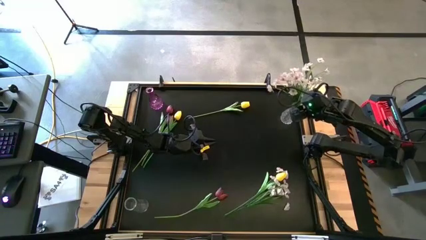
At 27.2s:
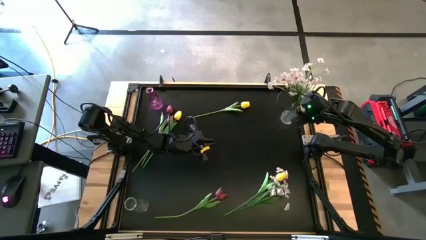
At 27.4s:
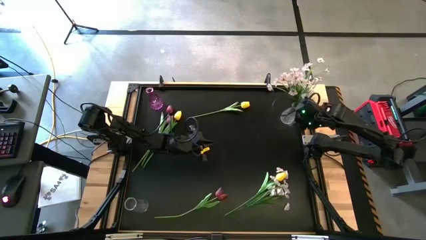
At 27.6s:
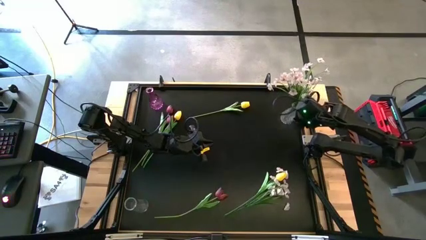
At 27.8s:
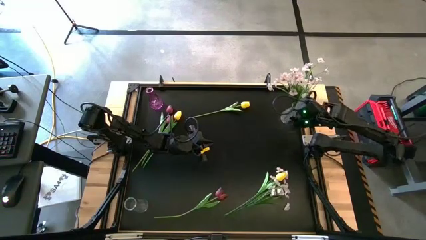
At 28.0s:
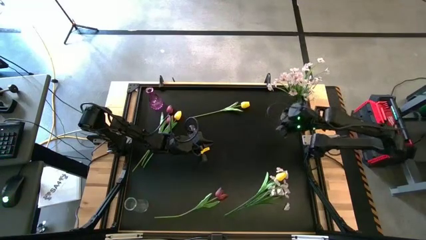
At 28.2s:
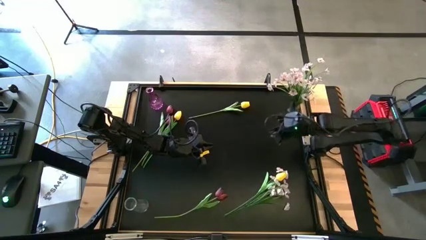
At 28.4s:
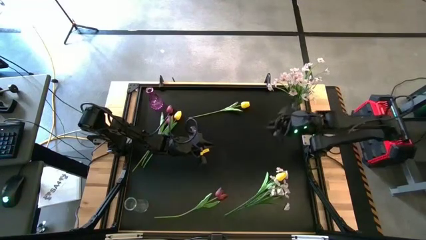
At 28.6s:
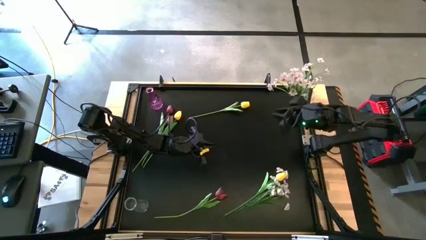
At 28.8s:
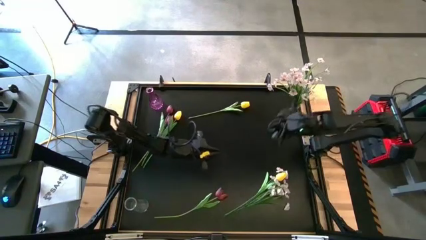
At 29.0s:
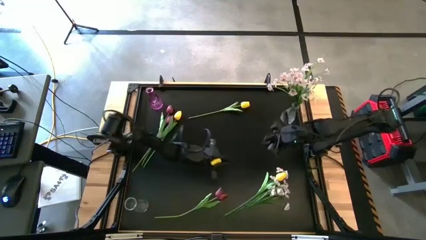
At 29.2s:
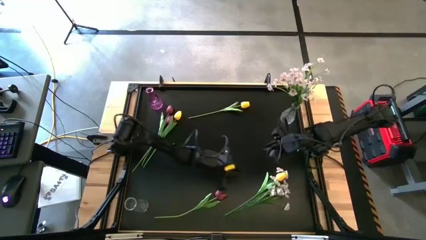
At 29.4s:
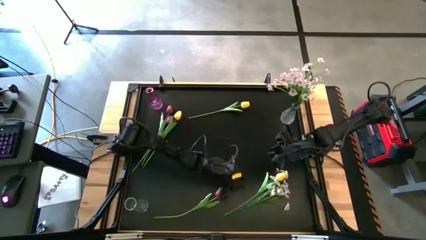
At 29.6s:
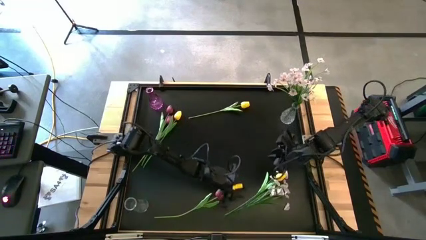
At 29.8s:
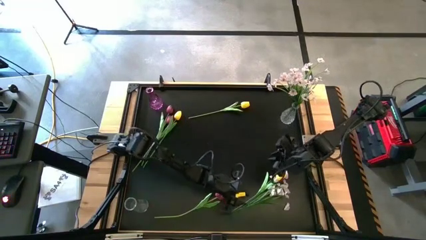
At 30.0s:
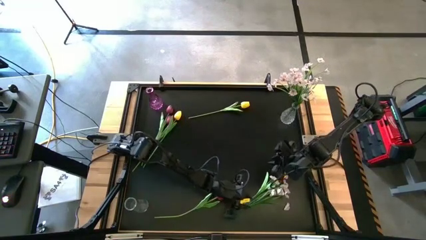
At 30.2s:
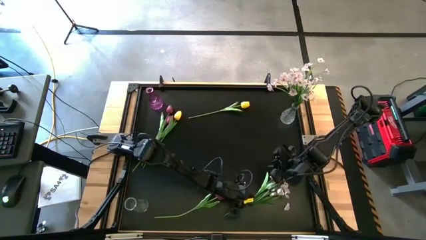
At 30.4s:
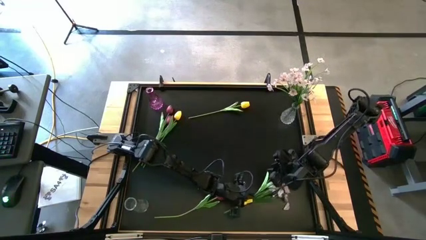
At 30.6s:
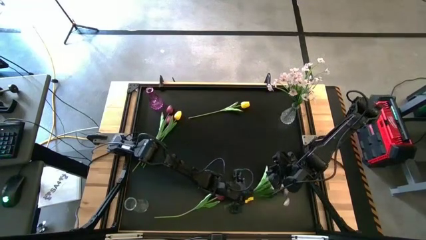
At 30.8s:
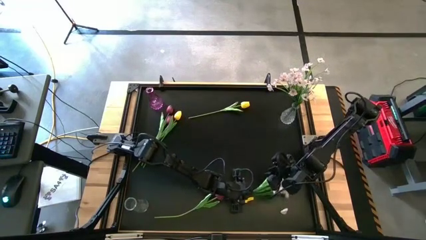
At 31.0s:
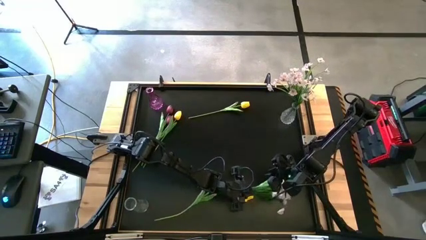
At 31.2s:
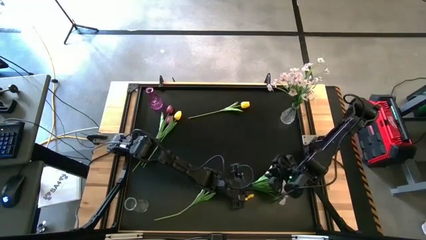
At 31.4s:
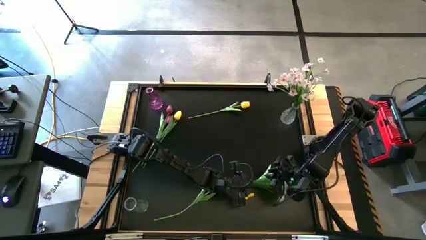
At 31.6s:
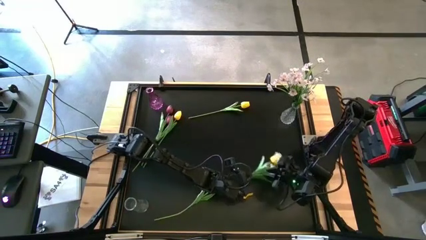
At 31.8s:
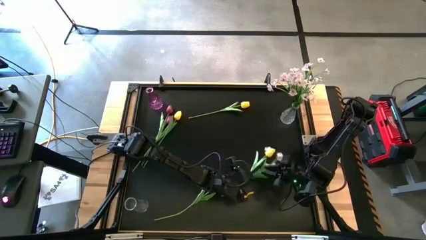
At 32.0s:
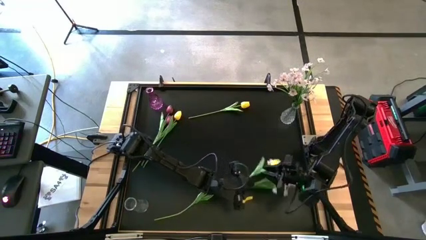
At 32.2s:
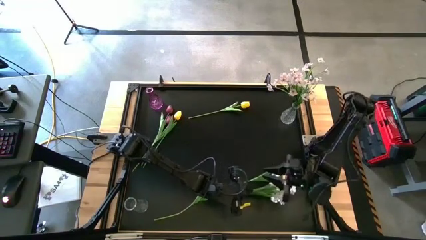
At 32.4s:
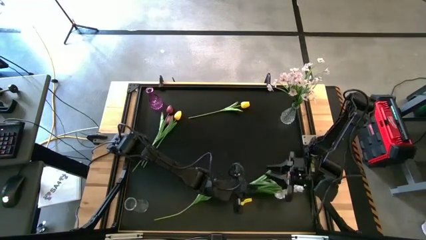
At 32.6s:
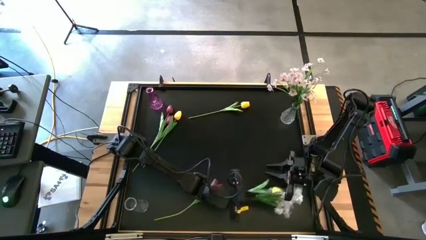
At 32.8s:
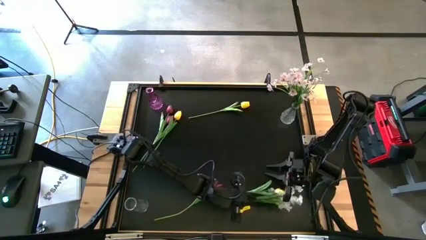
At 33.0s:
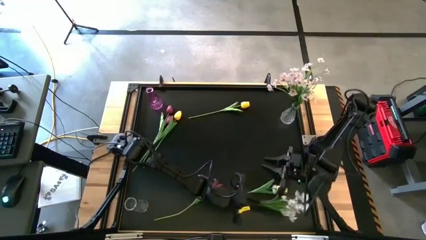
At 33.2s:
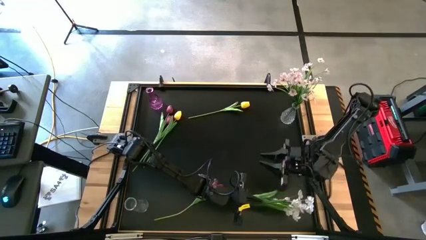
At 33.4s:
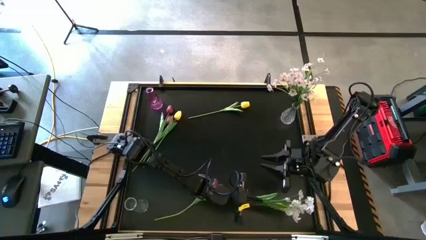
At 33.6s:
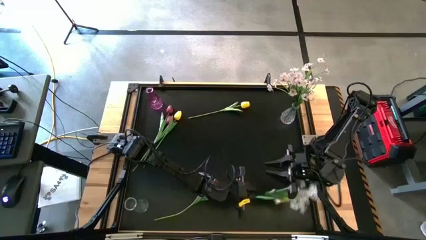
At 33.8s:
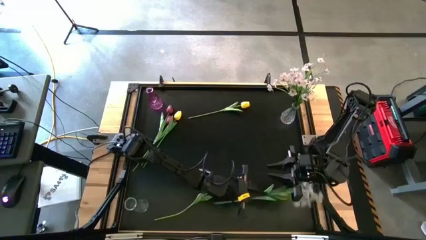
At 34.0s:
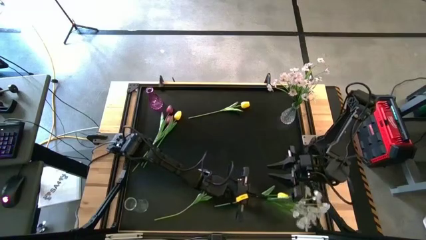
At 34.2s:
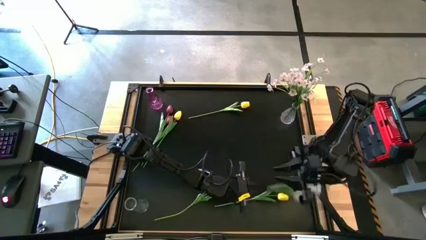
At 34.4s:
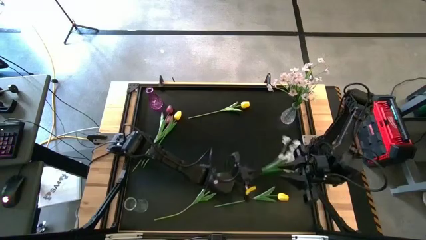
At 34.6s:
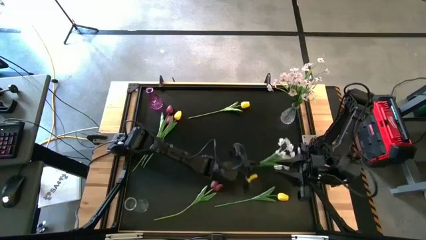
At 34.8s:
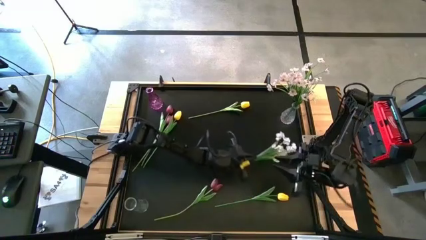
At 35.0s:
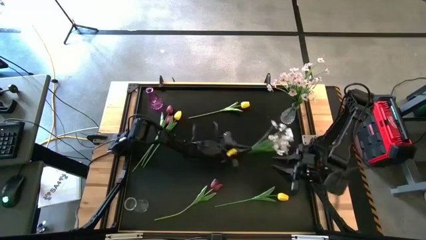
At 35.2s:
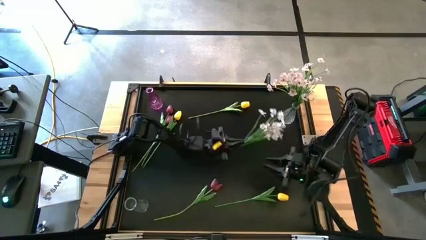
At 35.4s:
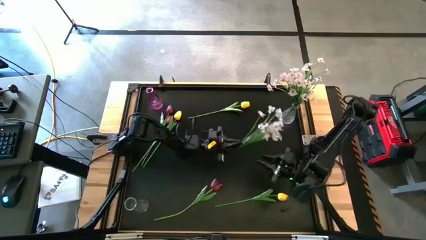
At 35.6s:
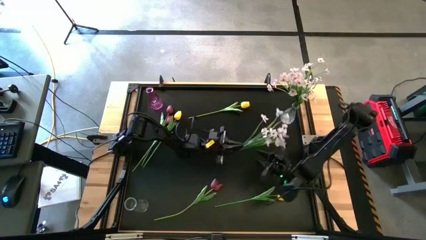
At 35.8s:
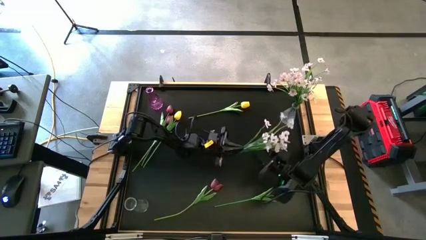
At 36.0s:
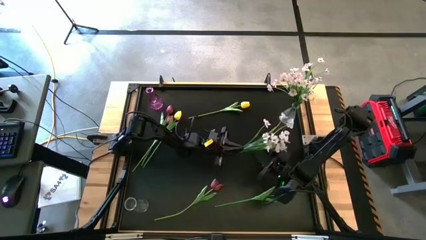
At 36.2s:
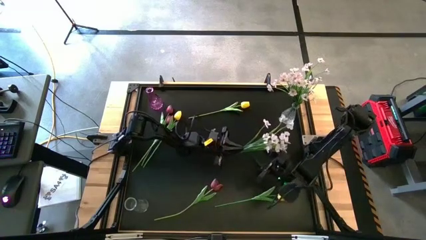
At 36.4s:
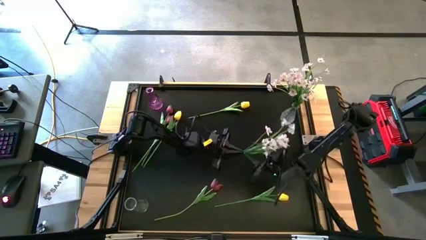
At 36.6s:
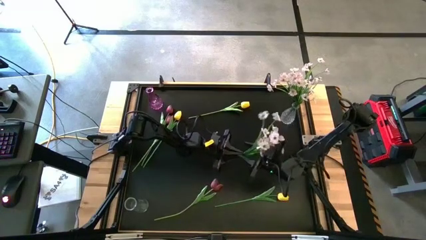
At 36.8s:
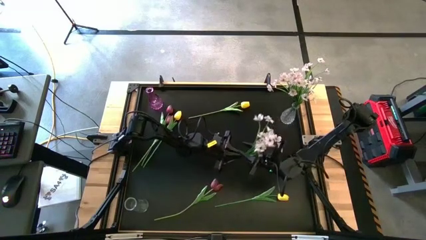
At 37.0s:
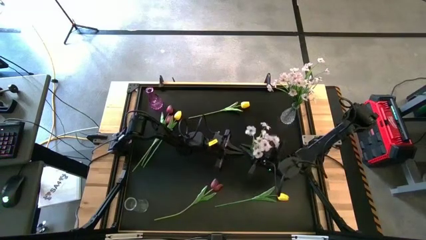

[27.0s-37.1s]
Task: Sort flowers into vase by color
Put the white flowers into the top transparent vase

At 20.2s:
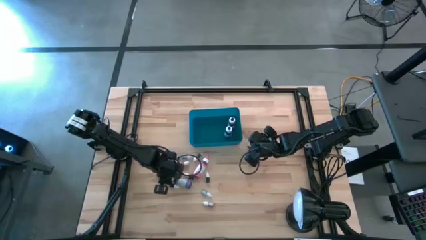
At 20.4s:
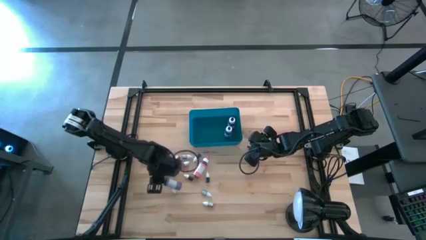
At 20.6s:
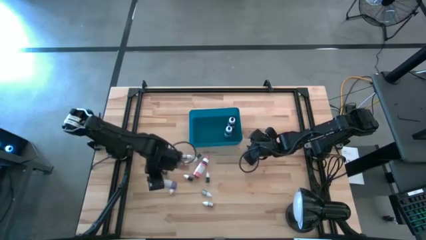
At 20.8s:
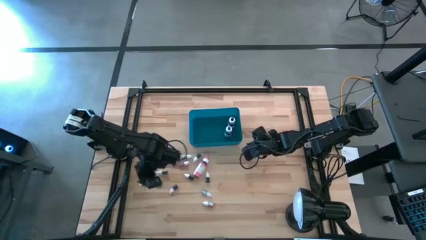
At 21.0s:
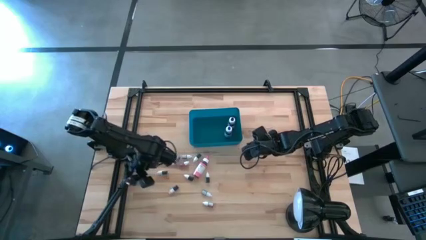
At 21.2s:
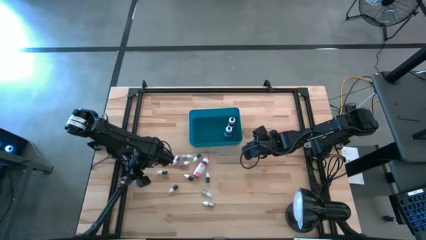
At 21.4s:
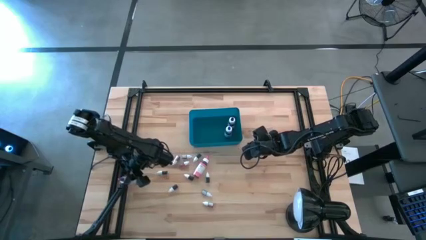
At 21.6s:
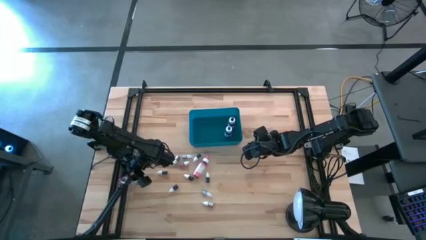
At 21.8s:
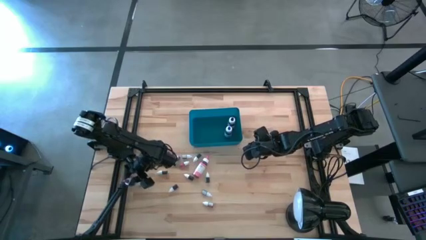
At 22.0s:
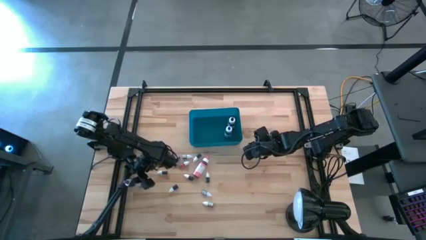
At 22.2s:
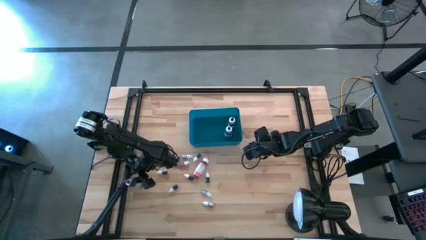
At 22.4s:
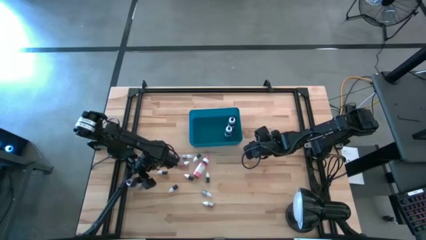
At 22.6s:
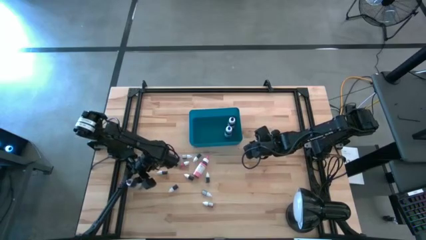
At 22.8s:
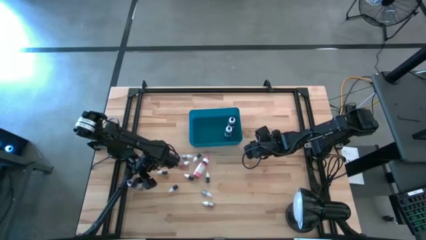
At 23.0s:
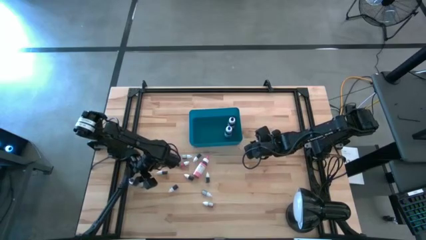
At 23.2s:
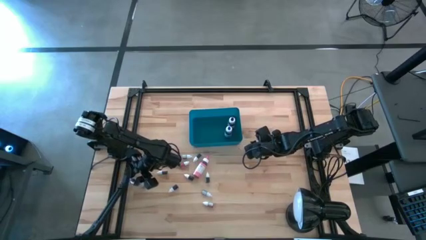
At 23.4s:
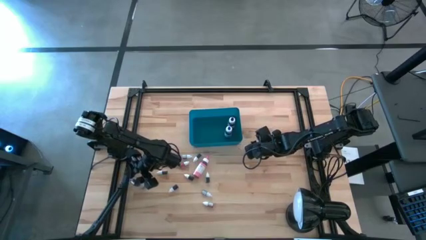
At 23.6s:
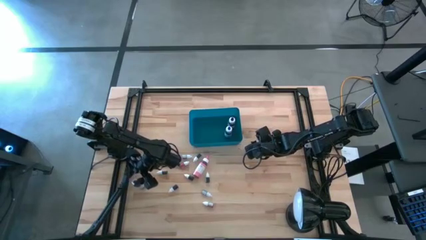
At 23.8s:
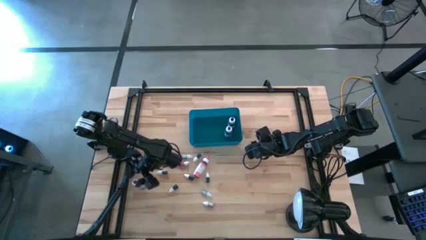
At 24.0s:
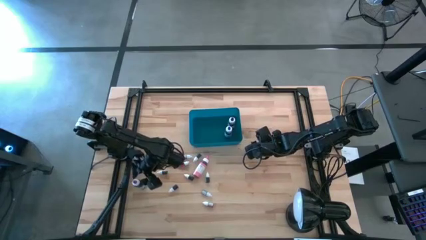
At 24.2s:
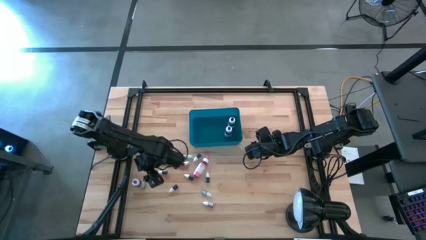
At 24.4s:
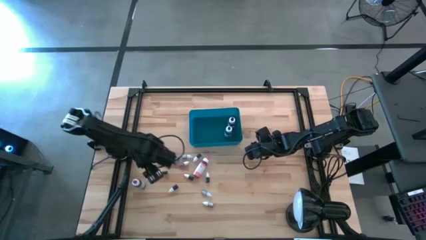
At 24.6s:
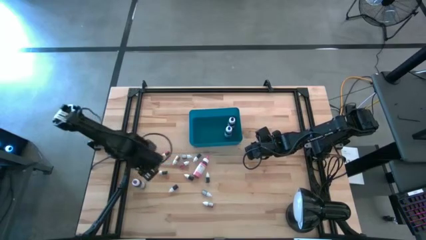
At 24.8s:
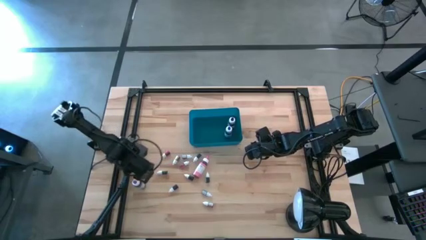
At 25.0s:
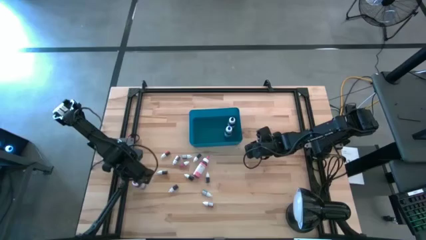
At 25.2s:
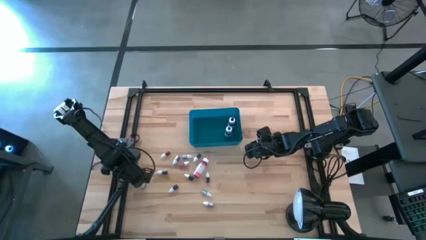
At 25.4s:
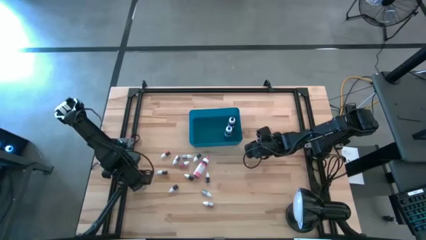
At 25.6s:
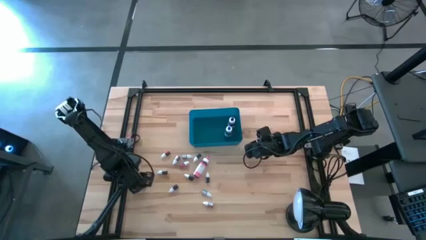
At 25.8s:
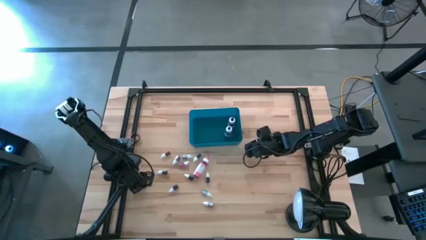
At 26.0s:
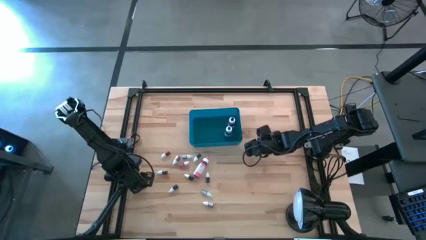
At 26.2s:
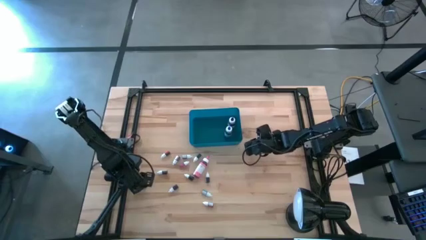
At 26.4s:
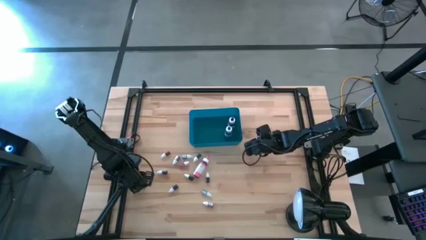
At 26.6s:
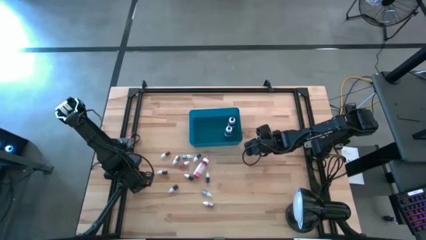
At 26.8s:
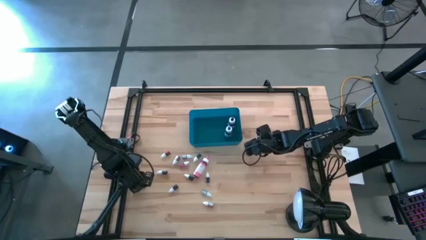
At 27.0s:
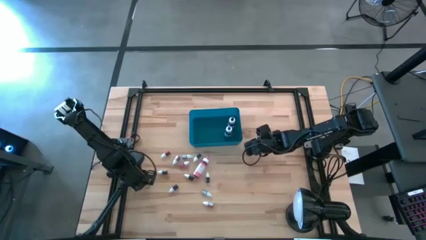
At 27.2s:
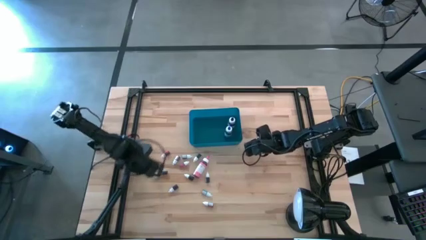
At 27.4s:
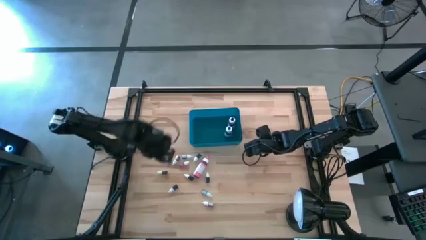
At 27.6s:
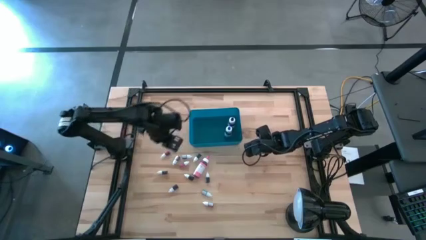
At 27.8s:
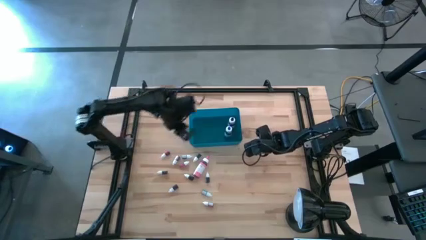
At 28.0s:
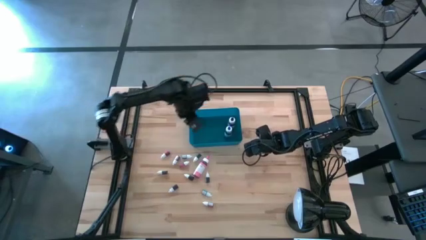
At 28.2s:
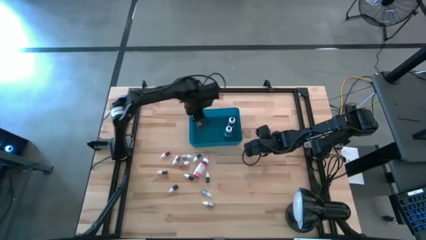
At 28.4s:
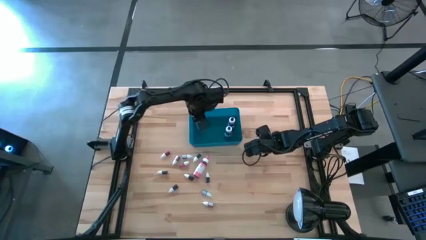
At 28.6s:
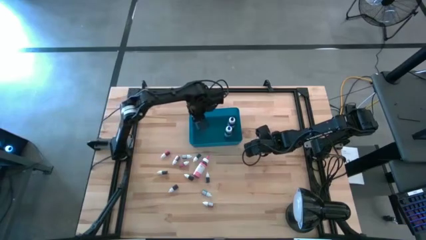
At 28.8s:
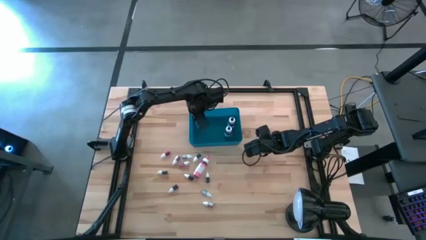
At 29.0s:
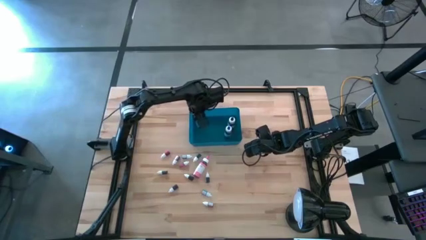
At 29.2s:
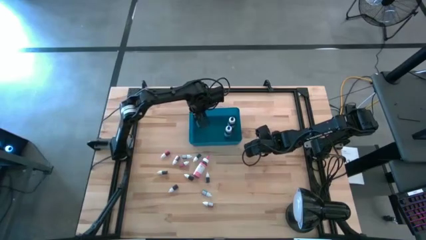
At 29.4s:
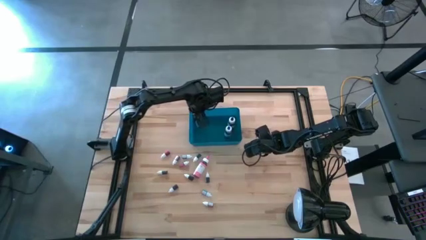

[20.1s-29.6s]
Task: Pick & Place food coloring
Put the large purple food coloring bottle into the bin
